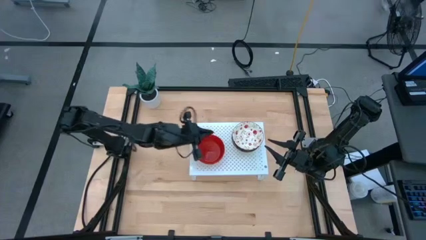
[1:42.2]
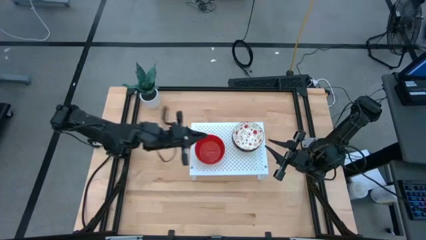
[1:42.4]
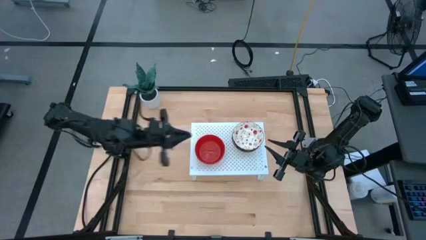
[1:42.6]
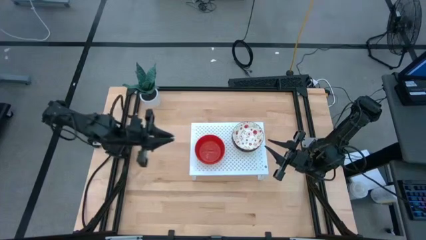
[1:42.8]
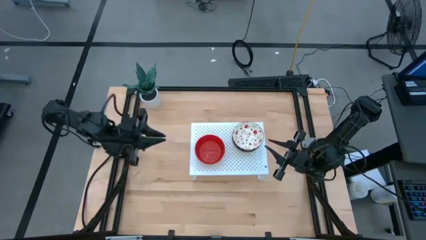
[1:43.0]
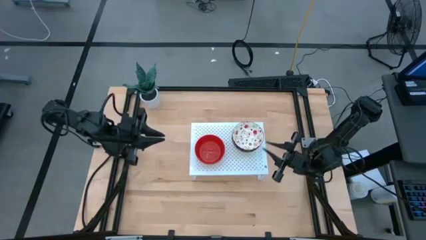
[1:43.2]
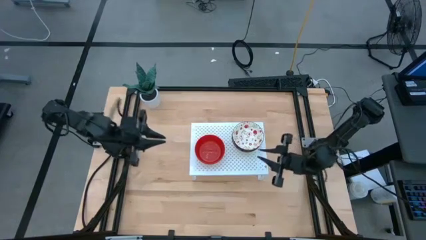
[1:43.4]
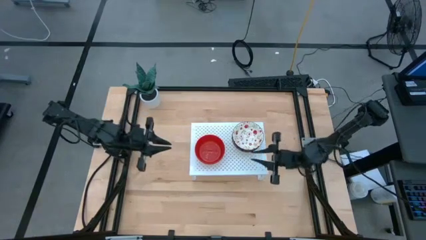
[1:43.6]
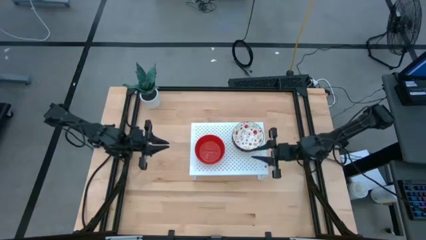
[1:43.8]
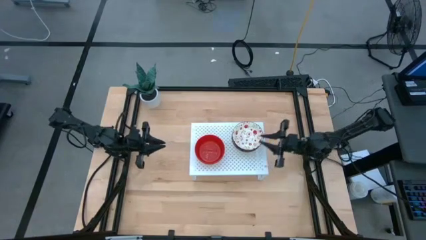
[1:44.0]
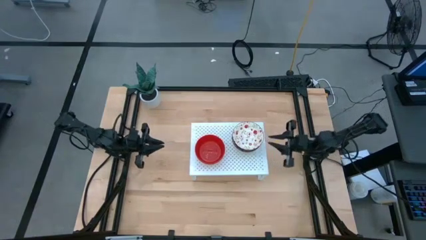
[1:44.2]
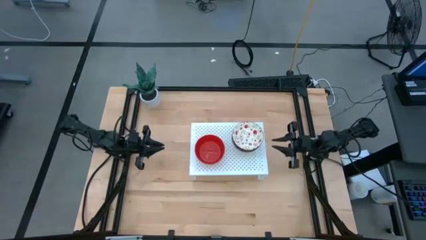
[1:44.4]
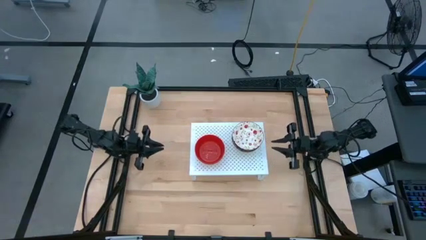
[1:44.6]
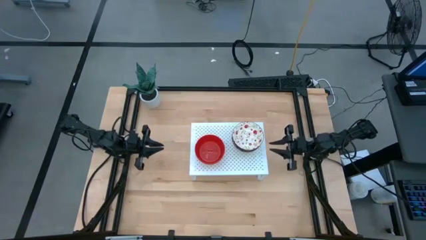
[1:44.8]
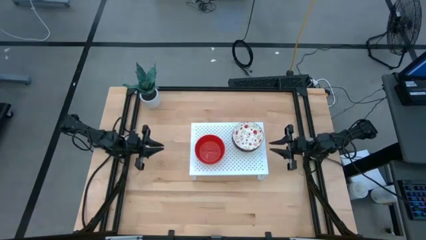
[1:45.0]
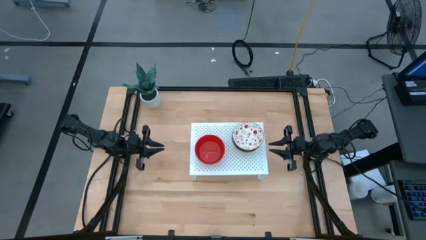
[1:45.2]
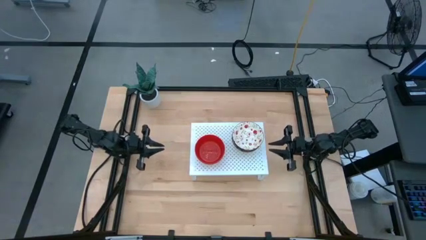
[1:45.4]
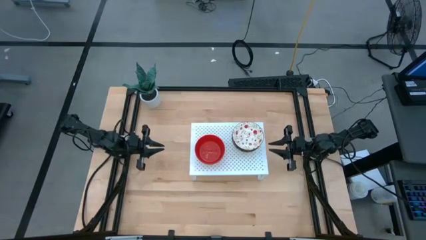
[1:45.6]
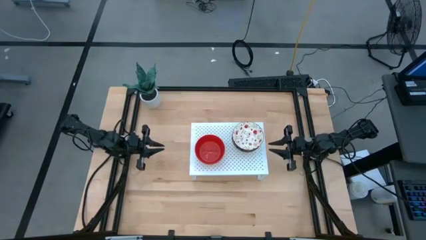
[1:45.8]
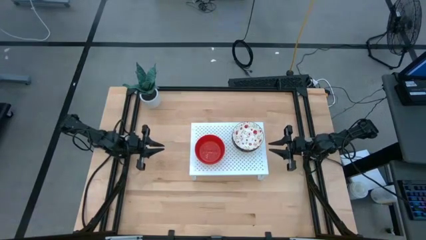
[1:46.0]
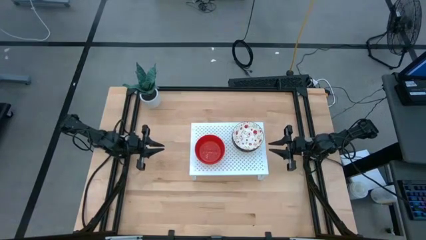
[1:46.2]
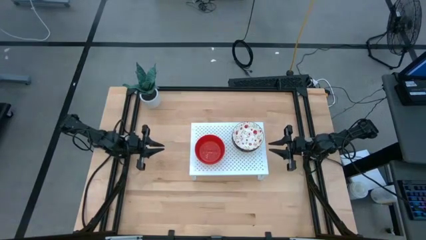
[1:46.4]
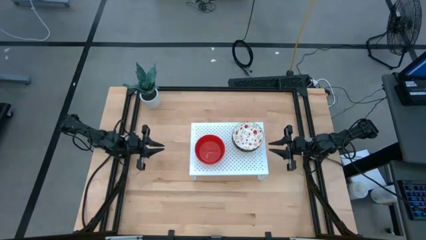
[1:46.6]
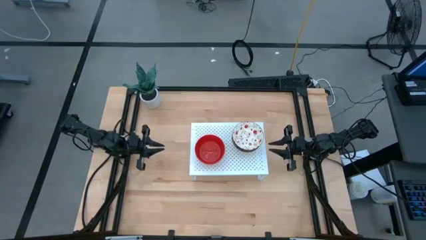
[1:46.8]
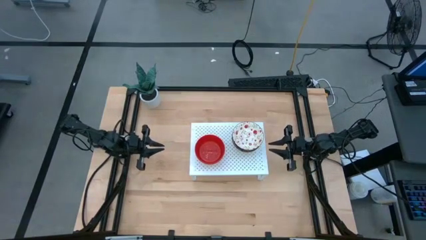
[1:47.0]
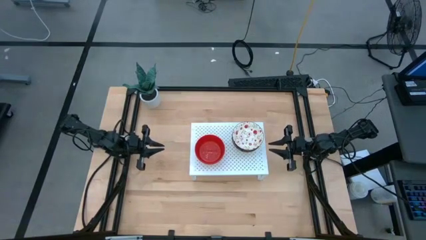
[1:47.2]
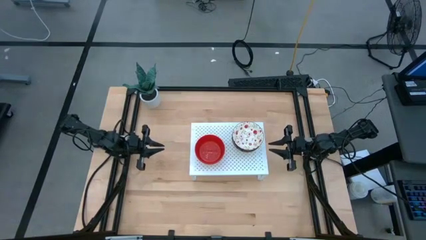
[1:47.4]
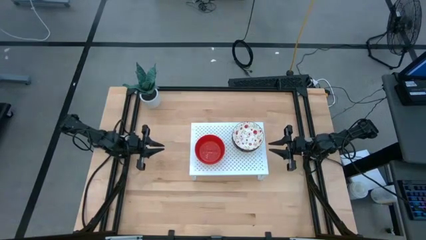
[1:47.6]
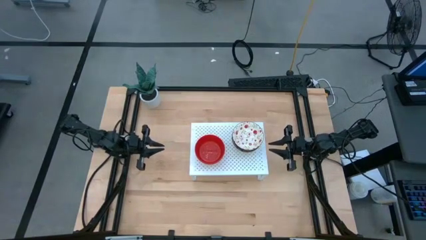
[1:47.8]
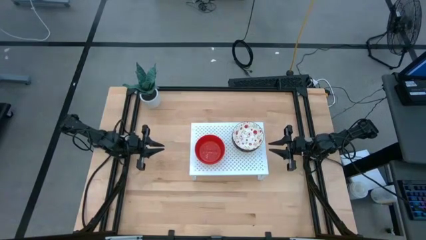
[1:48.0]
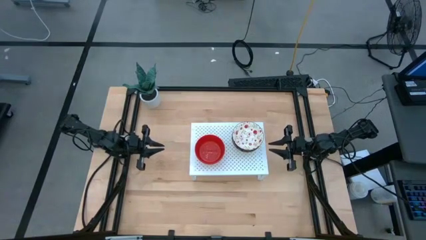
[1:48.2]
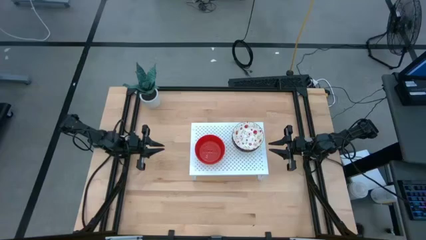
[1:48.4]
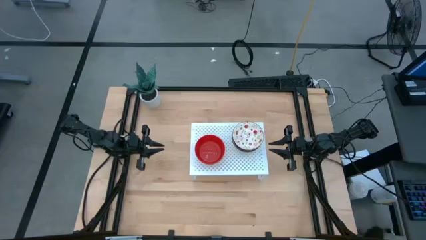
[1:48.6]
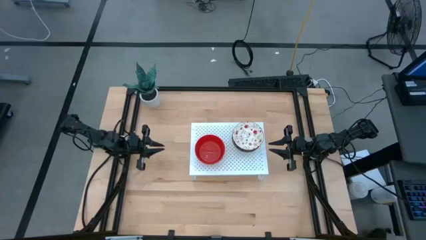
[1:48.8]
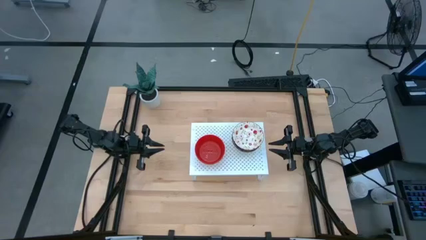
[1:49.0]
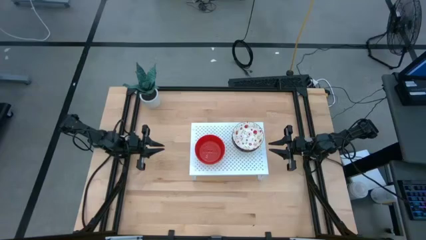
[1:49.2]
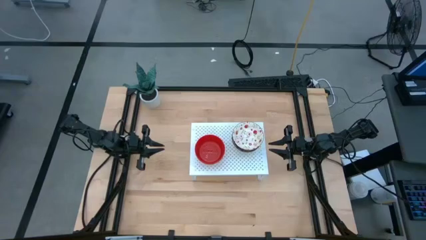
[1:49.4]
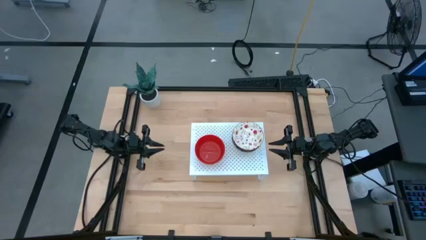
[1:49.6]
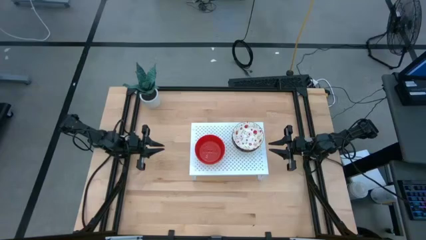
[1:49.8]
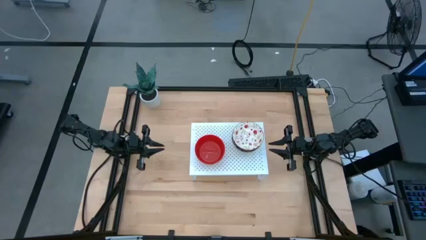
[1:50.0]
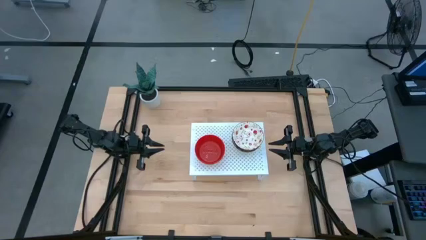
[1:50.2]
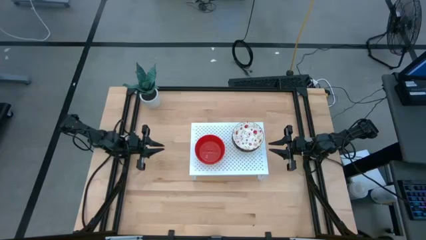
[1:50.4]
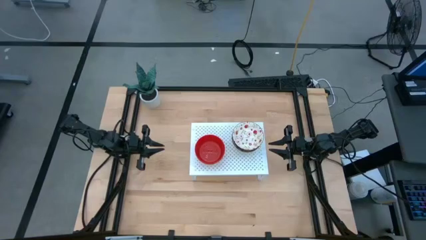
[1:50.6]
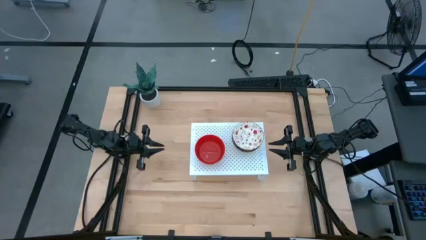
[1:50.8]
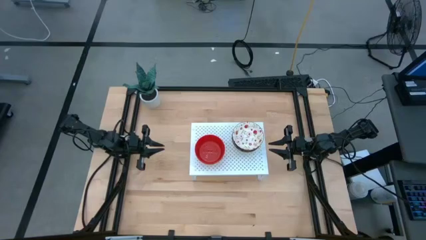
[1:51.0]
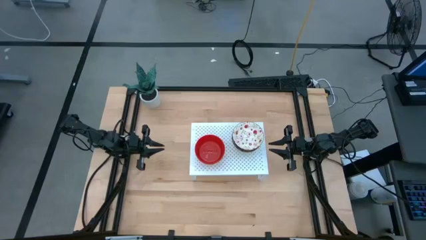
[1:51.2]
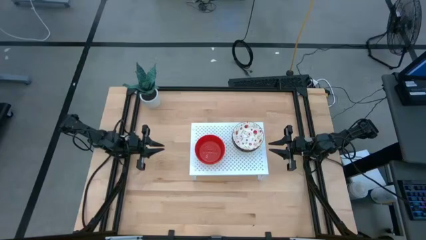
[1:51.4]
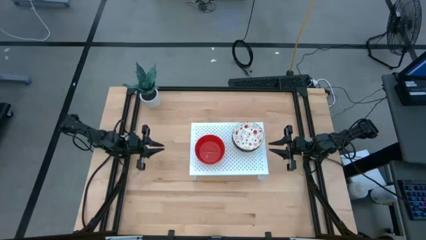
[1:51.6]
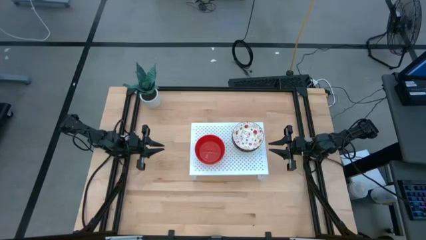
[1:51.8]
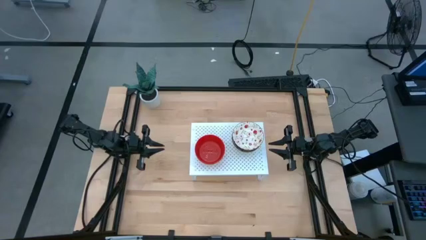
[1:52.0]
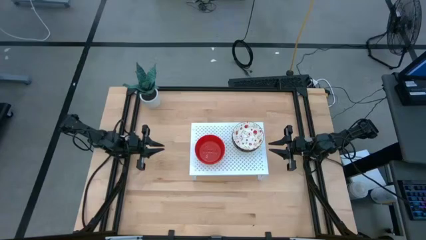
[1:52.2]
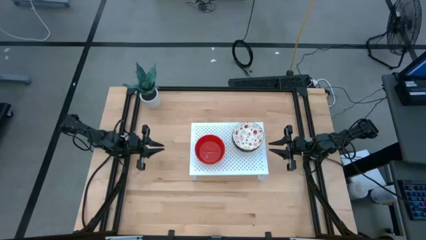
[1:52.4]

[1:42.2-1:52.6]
Task: Pick & Place Mini bowls
Return to Home Position
